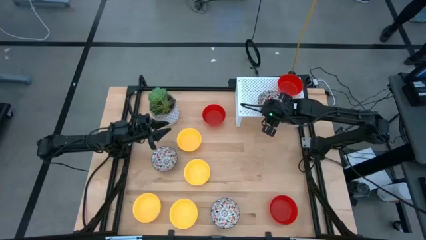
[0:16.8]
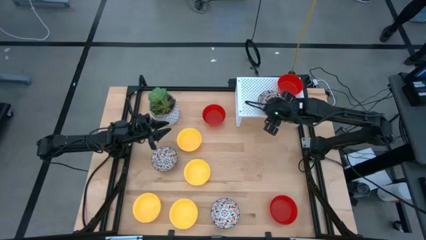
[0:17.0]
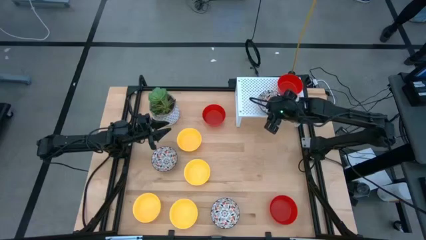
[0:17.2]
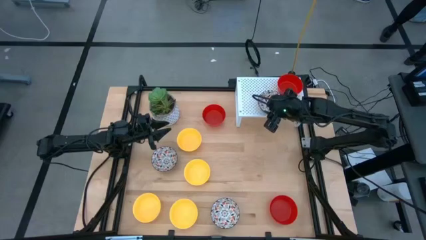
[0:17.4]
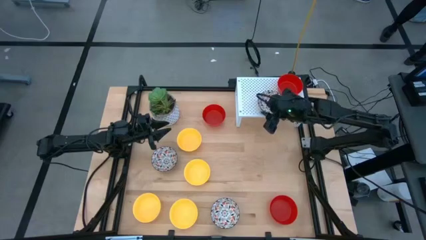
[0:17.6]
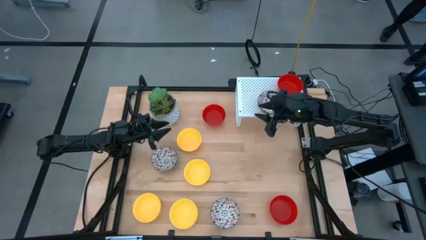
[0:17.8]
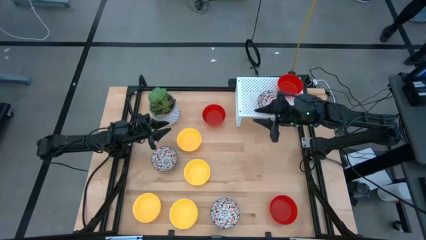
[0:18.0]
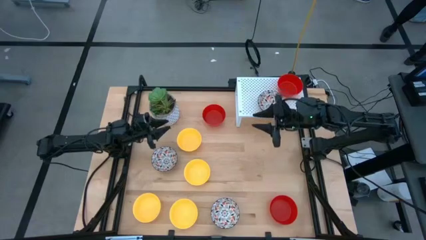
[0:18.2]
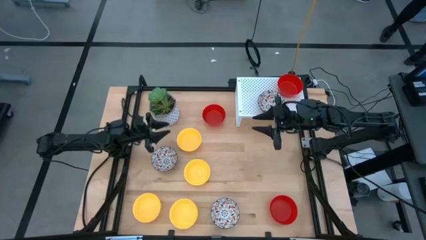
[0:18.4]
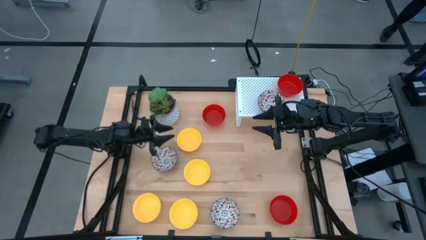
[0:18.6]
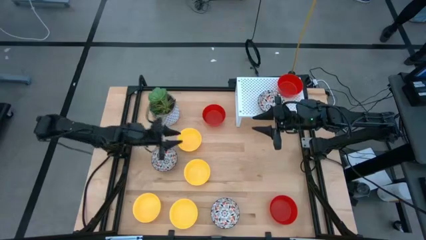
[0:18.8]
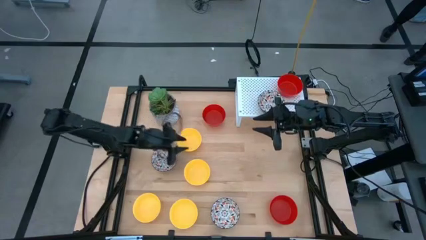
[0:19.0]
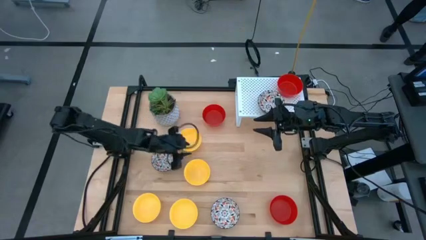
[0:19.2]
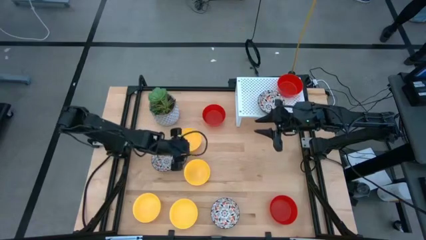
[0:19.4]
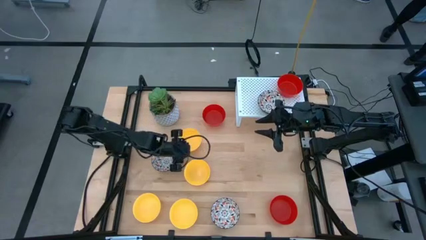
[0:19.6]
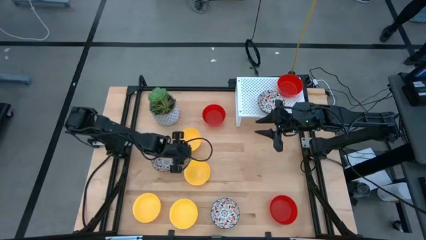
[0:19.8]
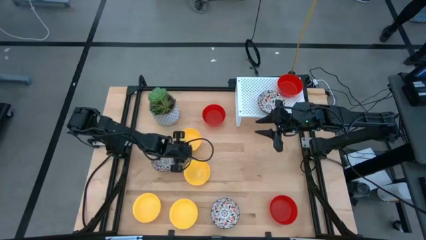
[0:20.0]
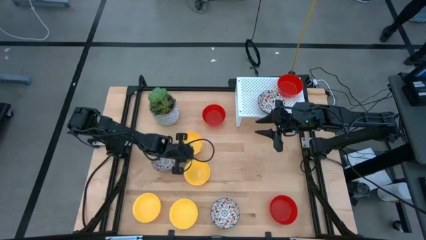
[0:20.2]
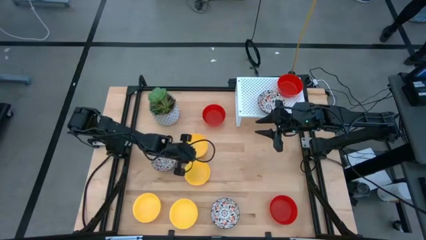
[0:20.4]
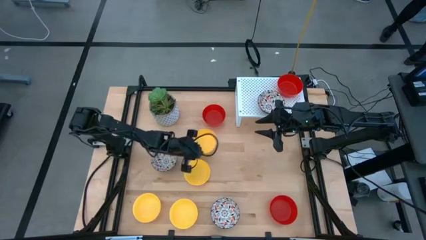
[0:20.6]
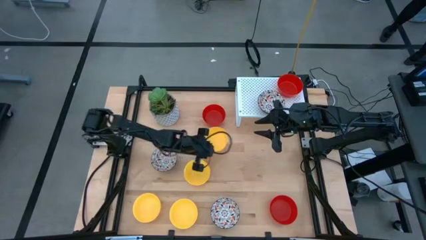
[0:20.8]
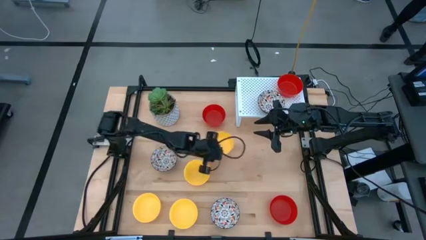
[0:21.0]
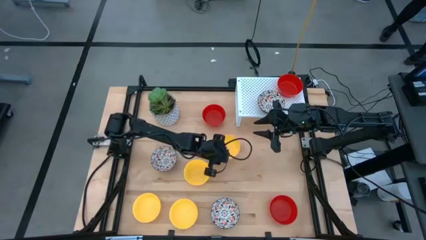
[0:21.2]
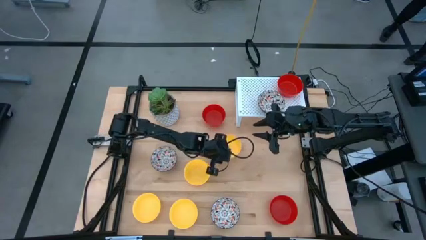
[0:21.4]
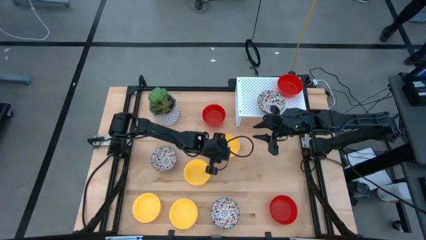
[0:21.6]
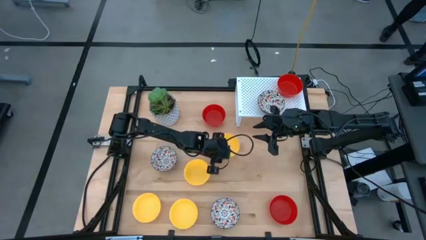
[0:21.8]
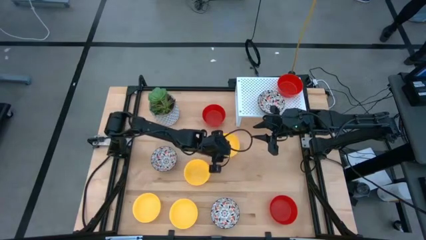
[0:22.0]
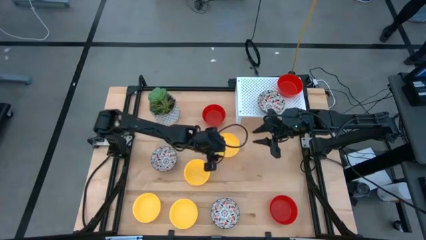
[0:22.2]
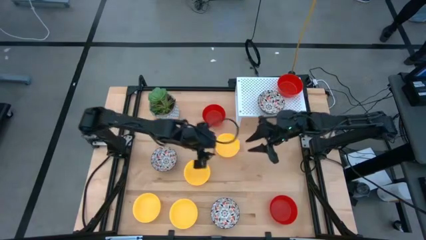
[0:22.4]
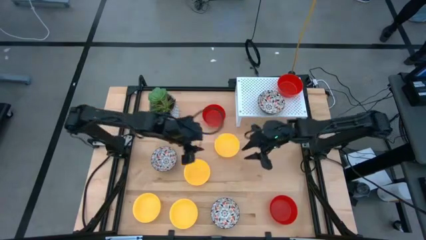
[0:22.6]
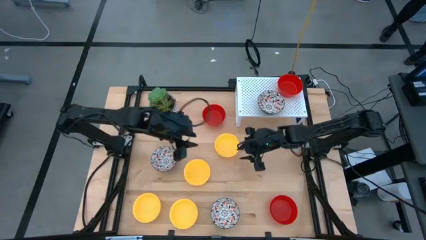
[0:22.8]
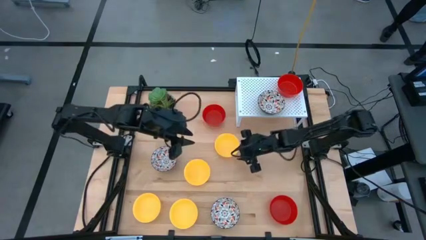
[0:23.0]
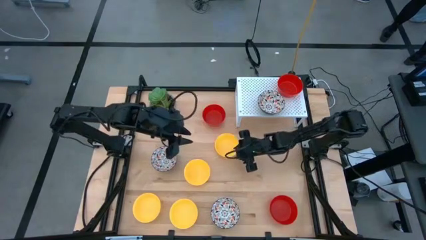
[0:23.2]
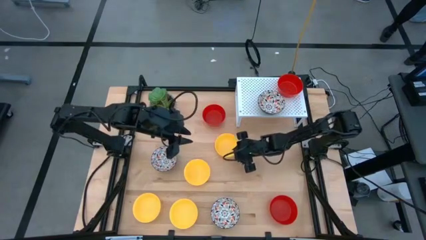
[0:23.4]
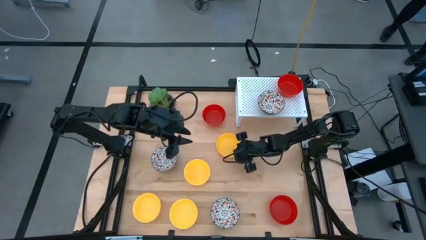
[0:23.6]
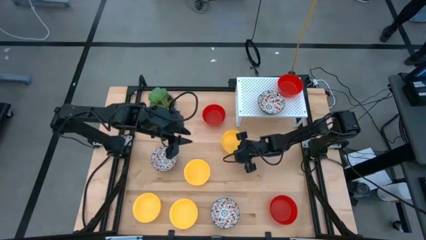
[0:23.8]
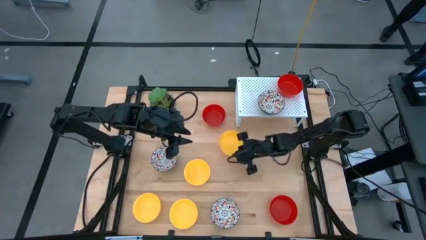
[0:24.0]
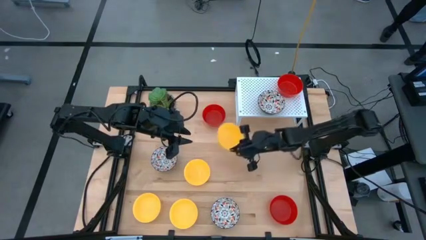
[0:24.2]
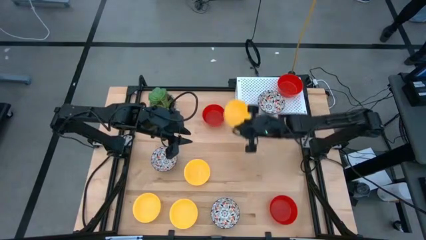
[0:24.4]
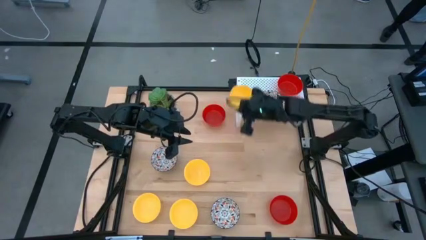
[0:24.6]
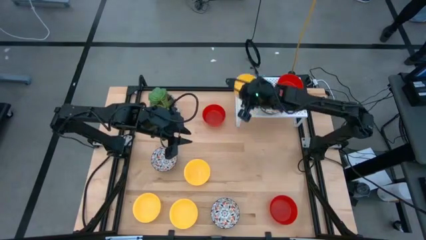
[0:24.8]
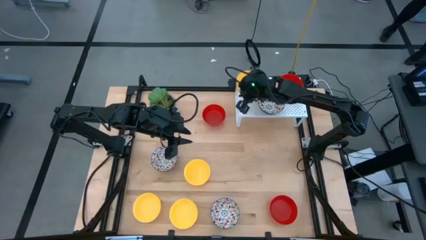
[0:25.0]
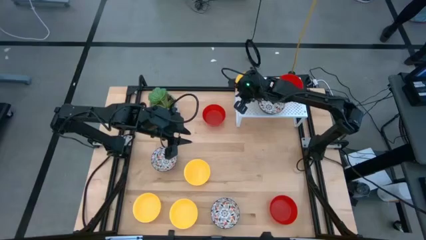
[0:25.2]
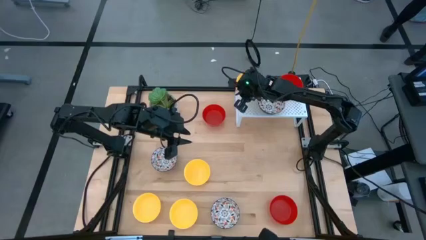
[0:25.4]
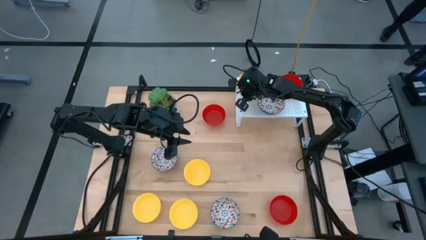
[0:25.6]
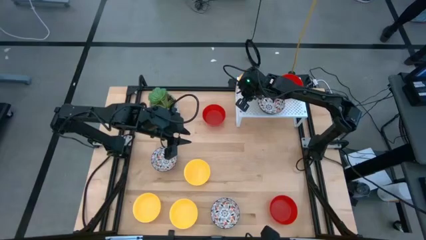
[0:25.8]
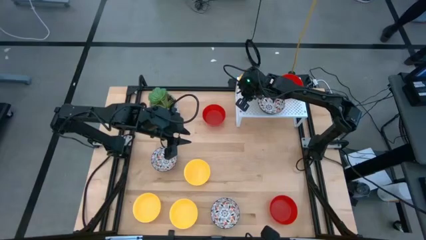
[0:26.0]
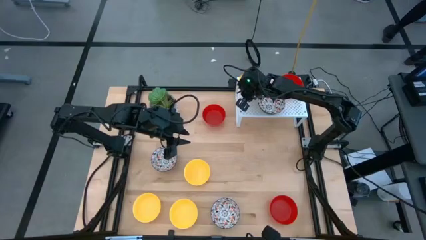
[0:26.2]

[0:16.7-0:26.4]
Task: Pick & Place Mini bowls
Put the yellow bowl on the shelf

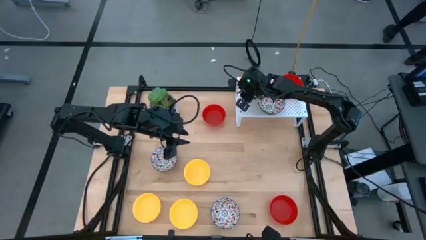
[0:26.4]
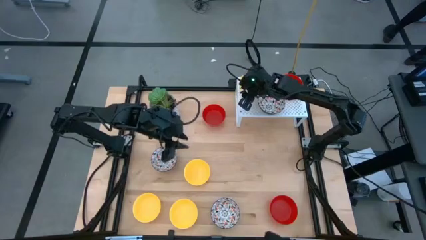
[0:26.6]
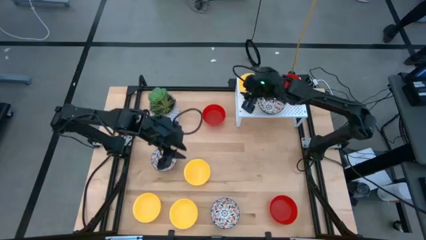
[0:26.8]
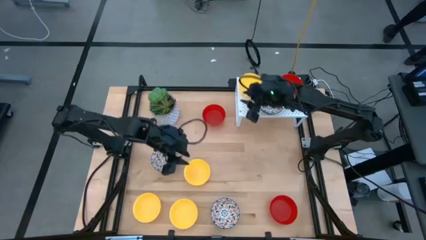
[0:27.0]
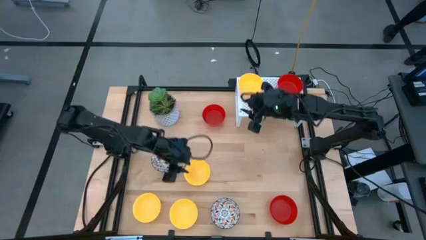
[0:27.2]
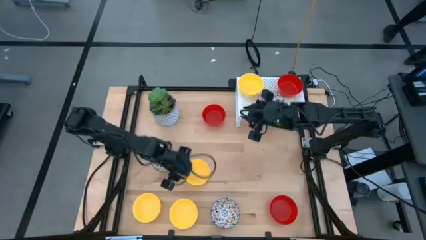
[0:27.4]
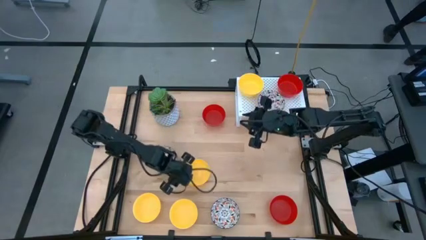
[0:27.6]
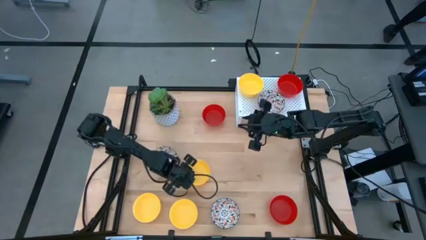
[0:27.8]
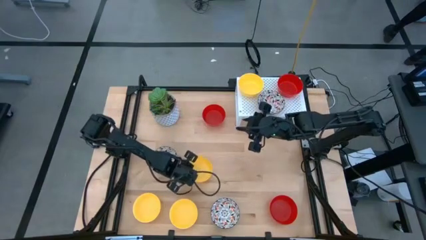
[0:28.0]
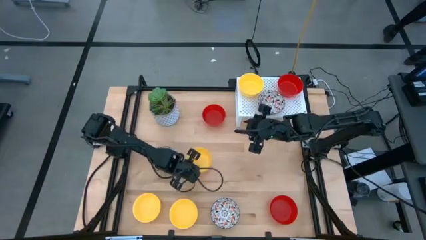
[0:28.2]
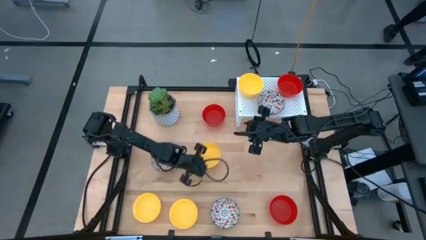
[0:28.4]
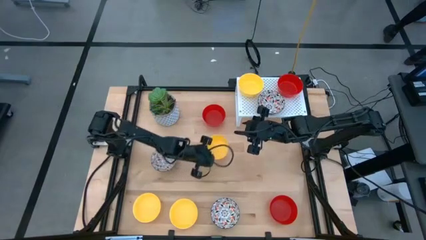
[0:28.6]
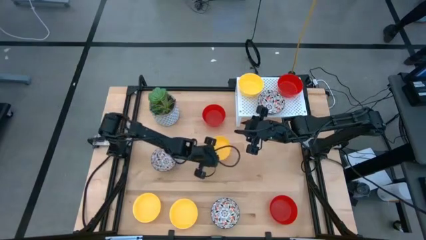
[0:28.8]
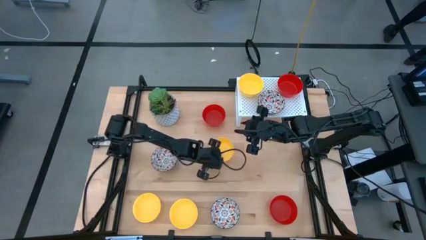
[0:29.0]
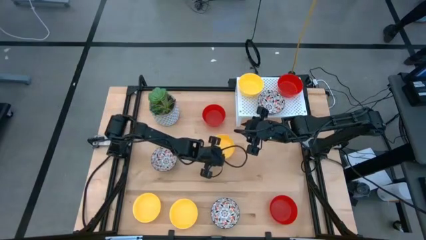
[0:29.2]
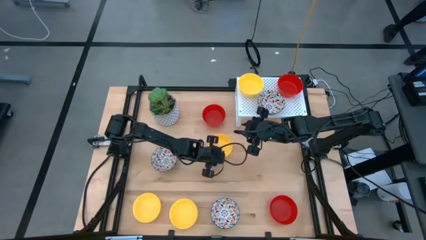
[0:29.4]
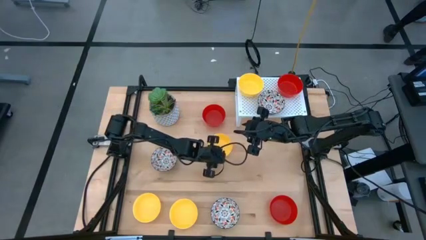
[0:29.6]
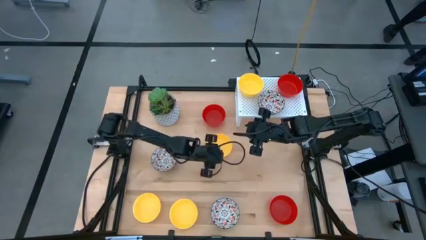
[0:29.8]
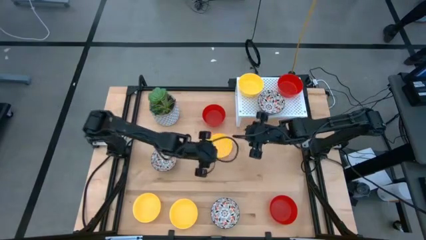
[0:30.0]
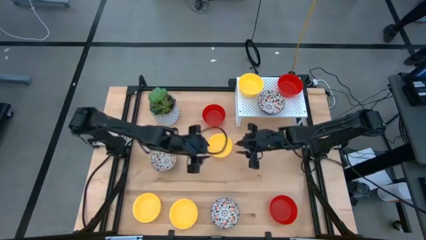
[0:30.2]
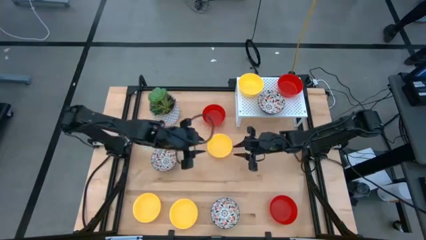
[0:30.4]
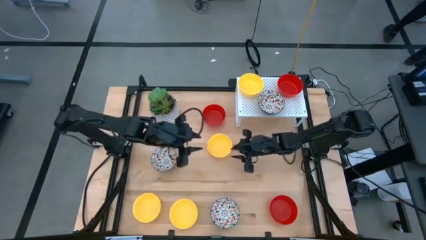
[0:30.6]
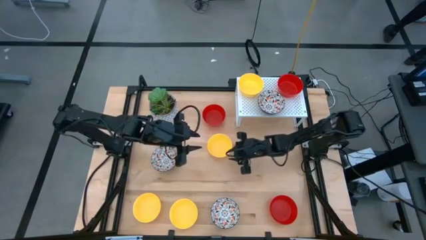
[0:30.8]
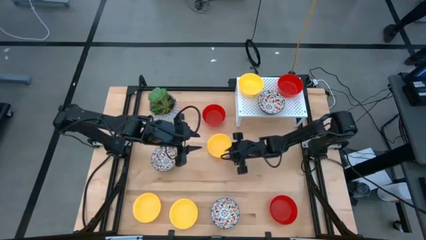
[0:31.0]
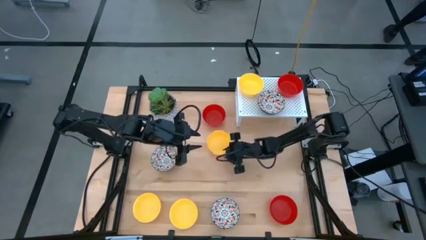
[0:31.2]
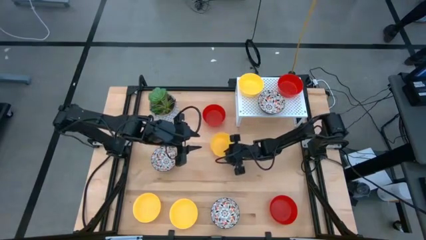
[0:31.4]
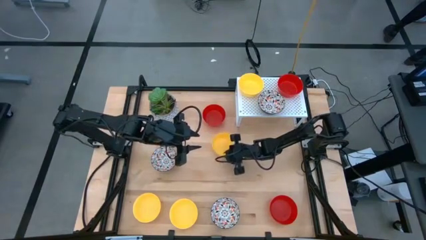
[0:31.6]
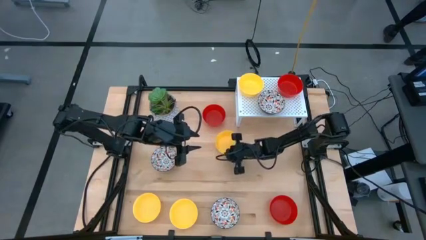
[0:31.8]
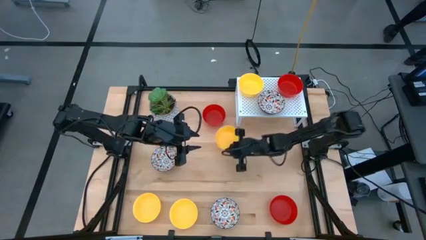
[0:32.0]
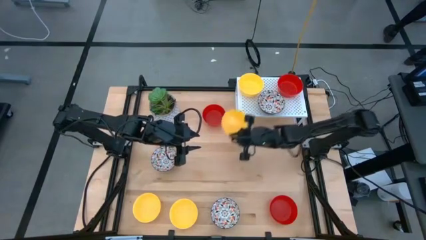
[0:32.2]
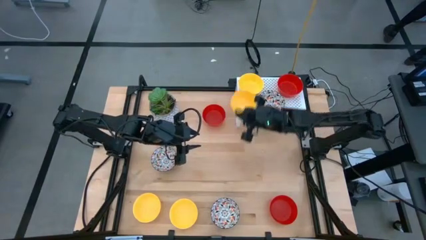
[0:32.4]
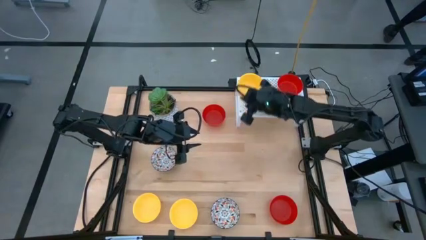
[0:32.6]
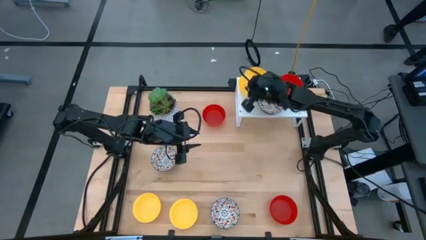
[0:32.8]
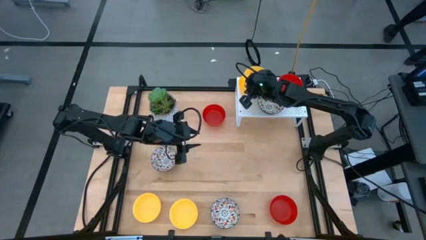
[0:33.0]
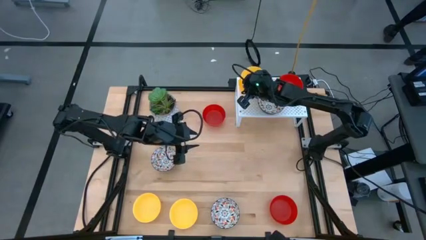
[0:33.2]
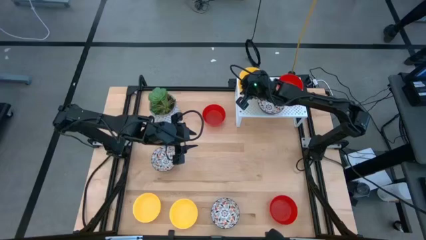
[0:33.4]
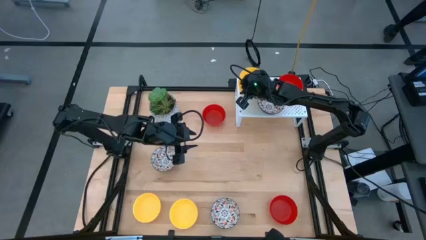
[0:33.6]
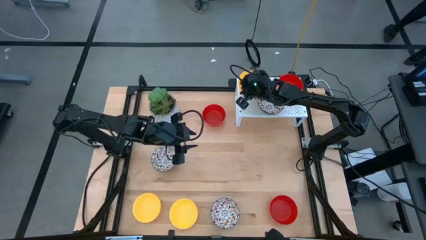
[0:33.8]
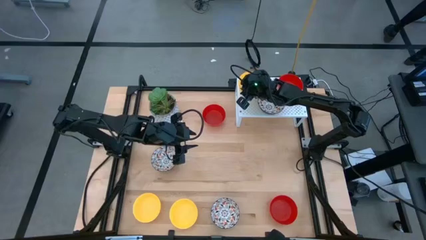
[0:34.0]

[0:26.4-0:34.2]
Stack the top yellow bowl on top of the yellow bowl on the shelf
